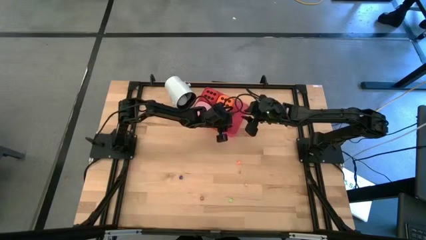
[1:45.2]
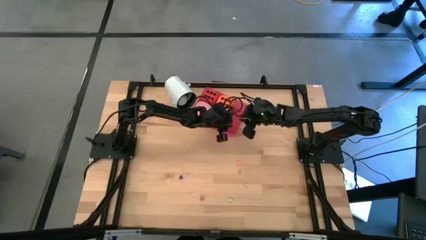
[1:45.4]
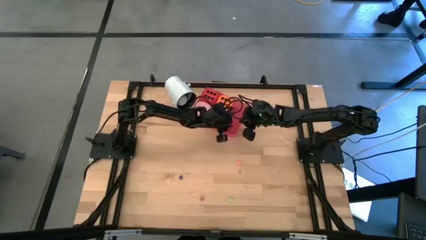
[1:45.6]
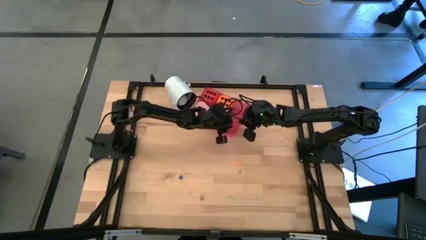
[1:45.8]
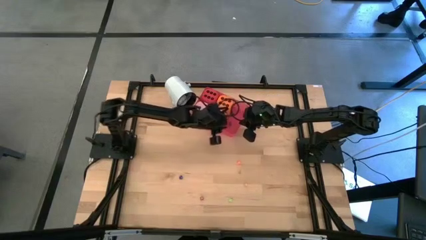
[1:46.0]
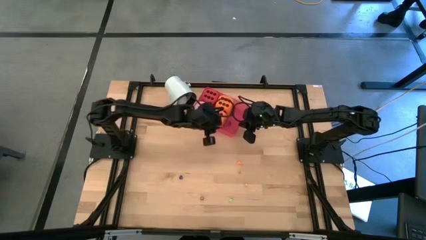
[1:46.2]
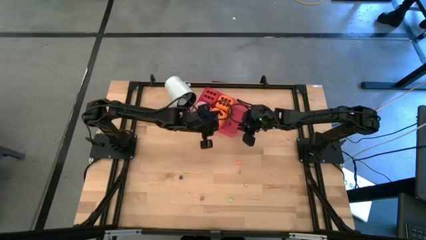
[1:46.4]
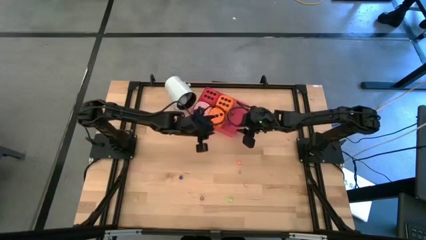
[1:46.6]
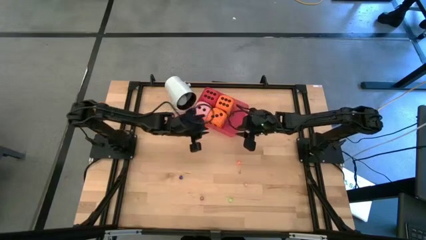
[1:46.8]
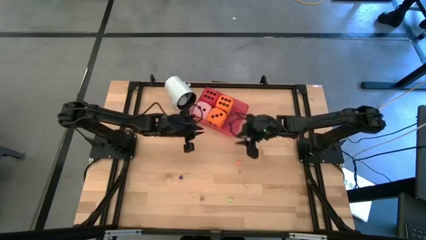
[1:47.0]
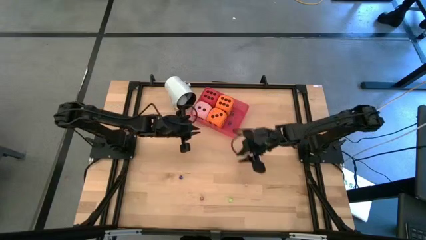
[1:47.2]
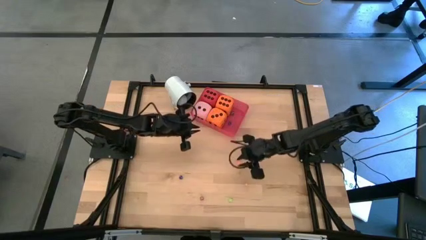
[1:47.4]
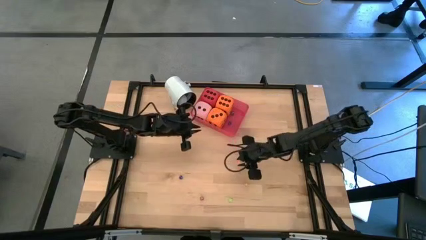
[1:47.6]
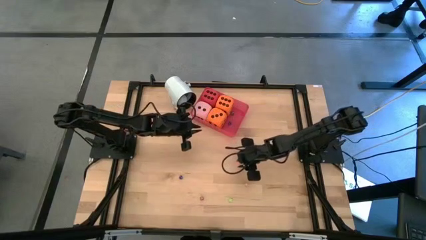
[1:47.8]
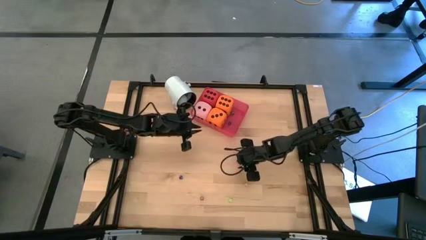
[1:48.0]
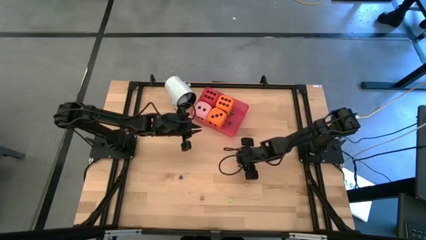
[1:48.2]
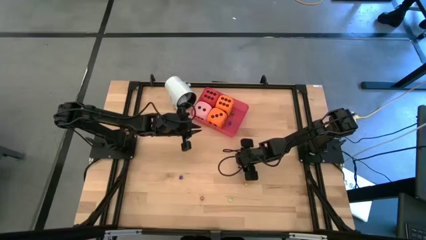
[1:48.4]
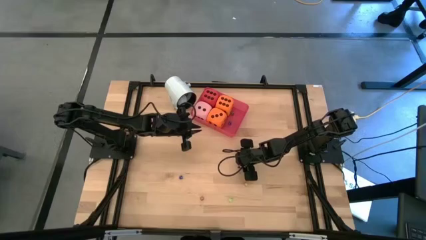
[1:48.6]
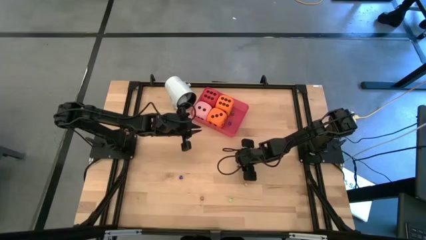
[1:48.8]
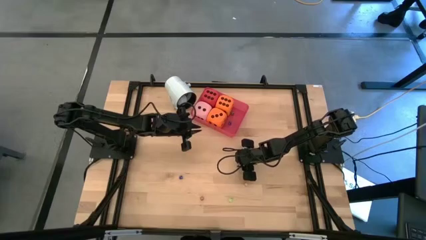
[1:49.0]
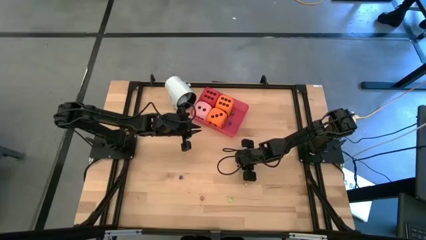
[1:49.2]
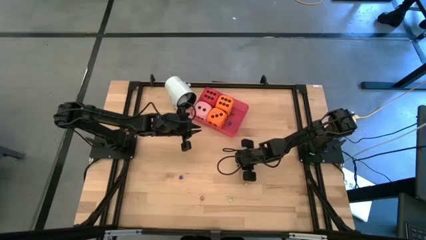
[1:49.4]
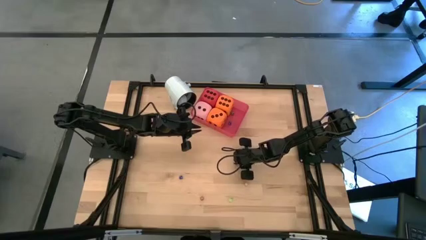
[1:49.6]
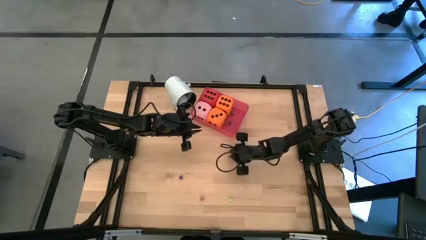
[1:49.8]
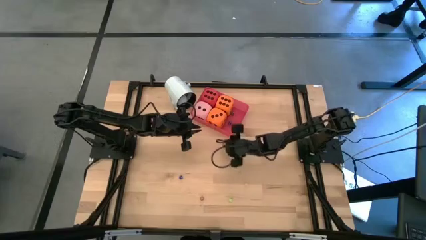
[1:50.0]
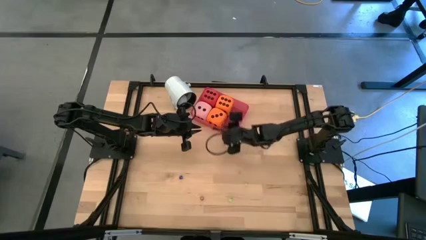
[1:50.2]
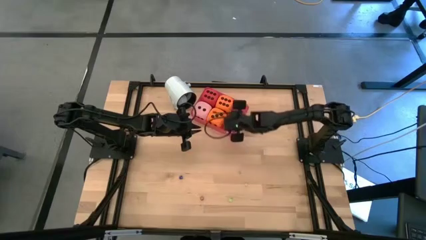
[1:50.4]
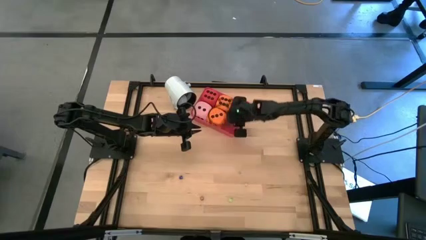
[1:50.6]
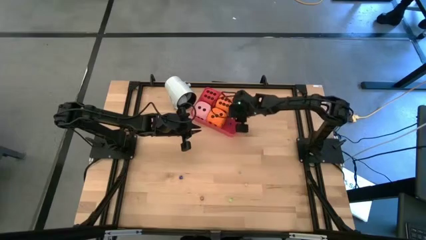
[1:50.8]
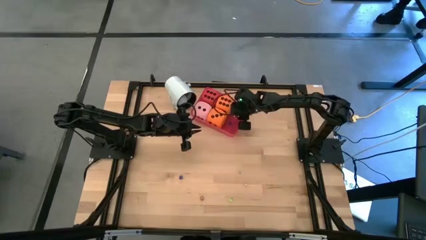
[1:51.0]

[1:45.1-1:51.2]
Task: Pick & Place Dice
Put the small orange die into the red bin

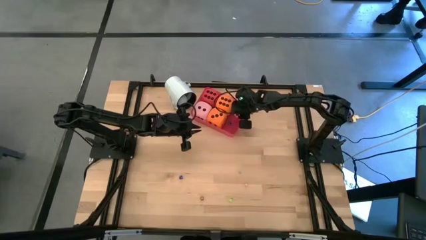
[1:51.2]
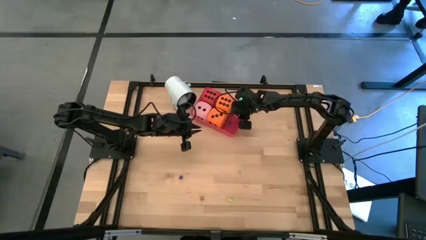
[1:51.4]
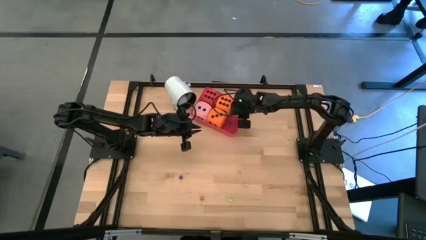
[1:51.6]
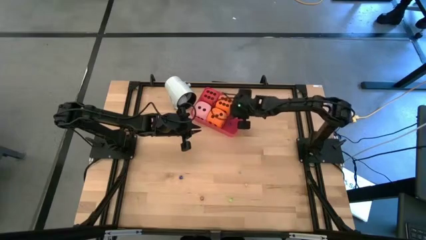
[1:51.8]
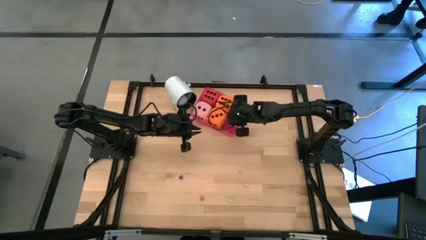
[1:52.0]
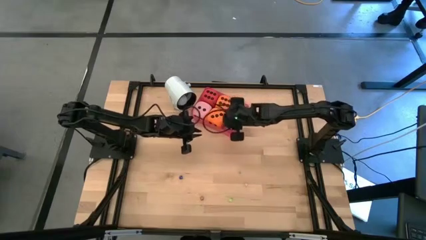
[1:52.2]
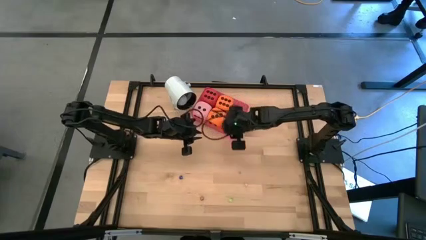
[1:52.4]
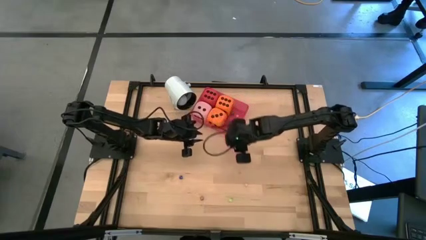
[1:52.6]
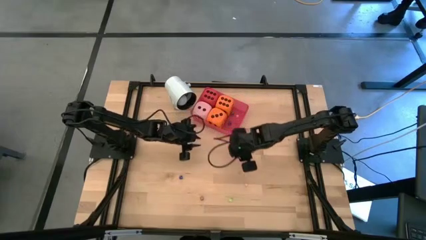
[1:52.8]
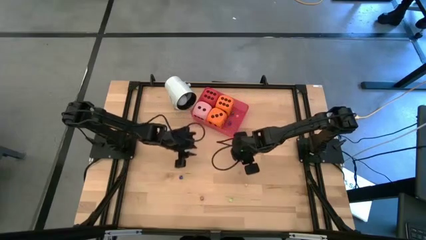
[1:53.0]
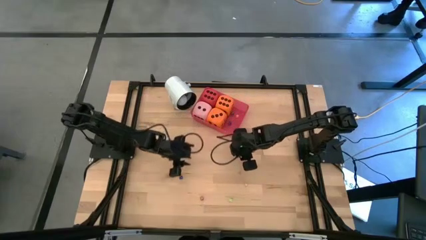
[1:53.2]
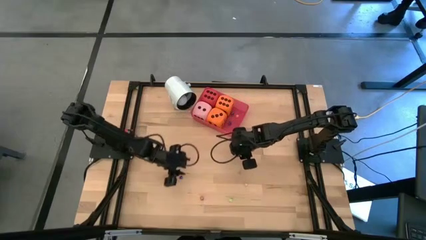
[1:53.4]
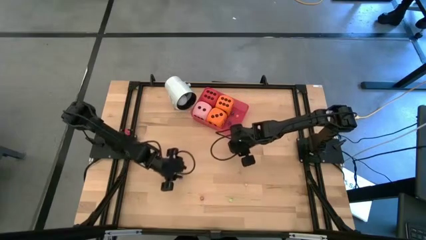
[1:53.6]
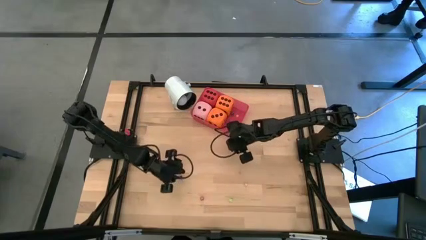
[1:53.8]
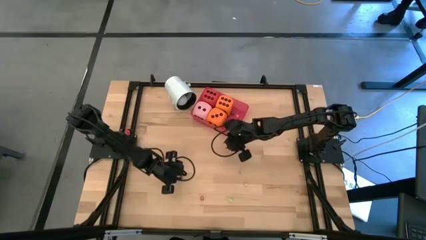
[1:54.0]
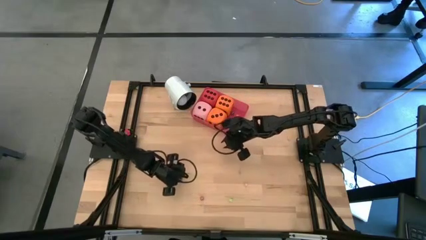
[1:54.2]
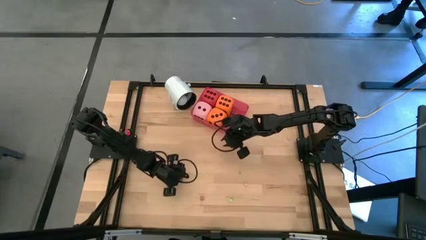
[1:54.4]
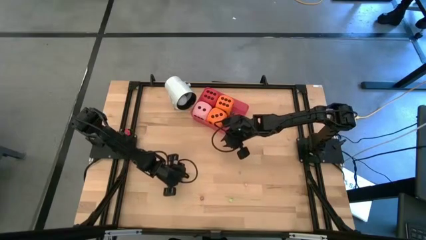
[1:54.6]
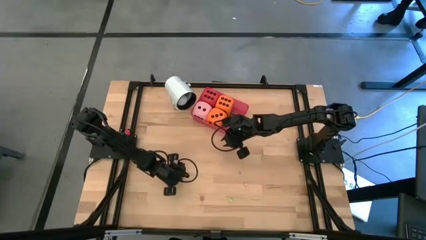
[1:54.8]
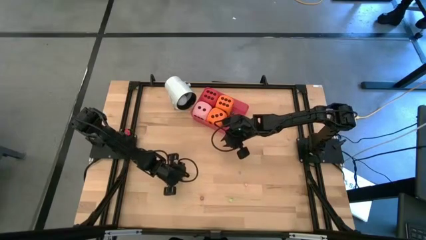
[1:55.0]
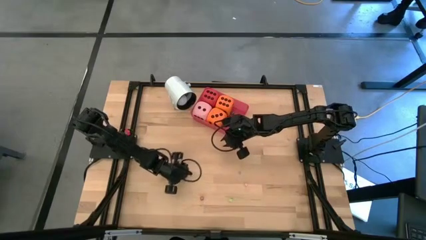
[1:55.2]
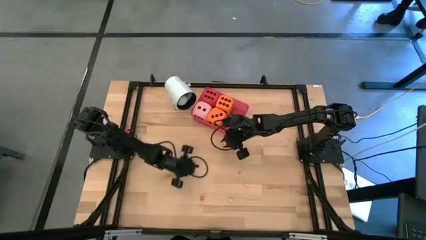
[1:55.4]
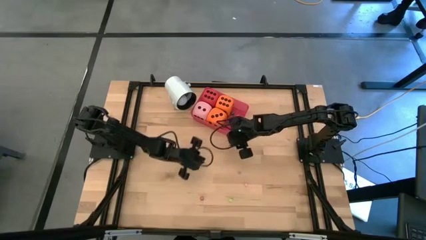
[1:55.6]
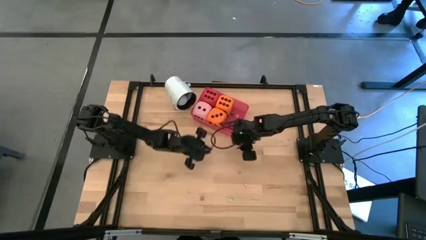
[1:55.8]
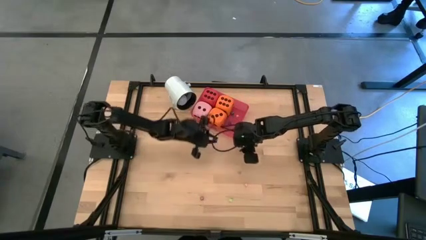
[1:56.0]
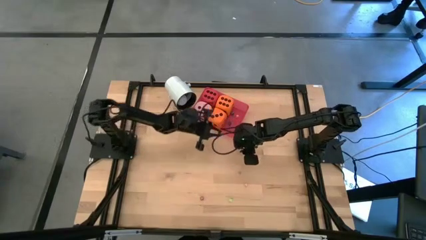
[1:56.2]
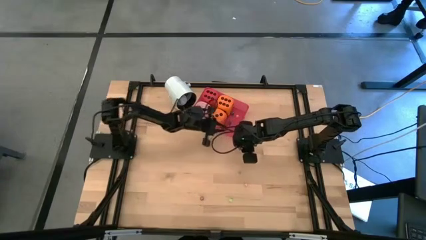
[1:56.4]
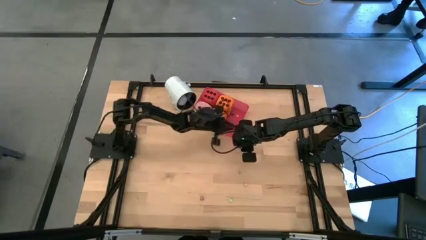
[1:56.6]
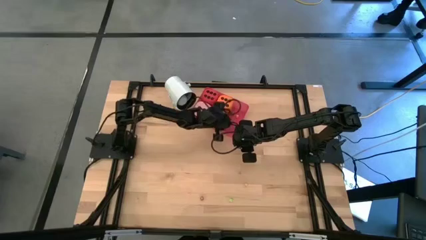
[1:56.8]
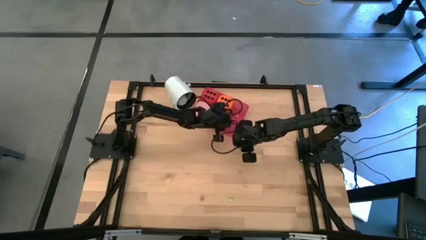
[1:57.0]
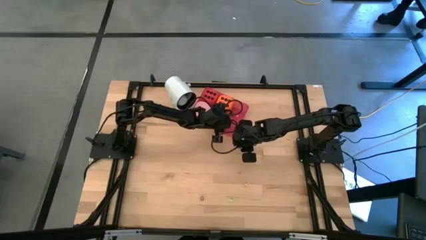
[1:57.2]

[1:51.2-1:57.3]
Put the small blue die into the red bin

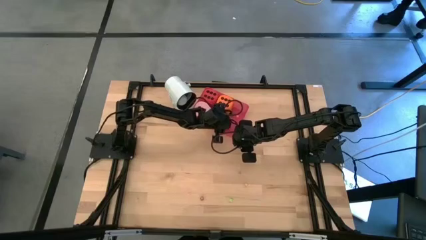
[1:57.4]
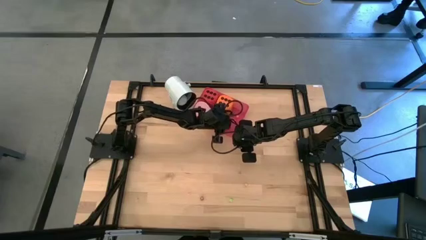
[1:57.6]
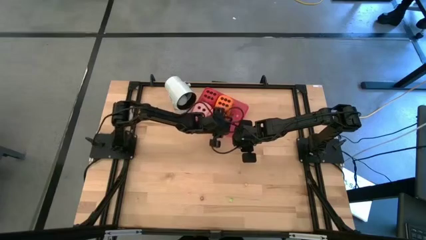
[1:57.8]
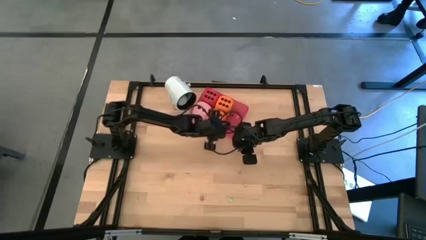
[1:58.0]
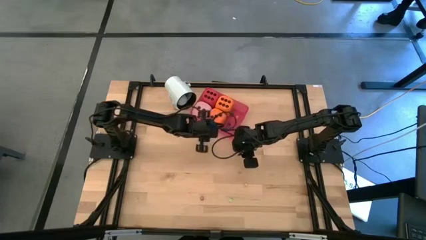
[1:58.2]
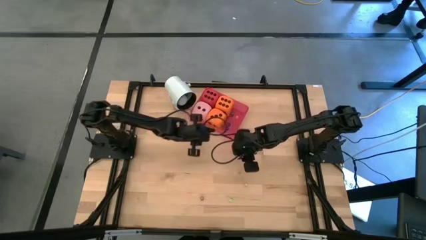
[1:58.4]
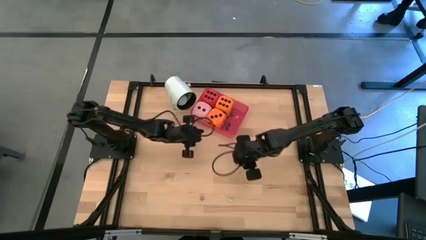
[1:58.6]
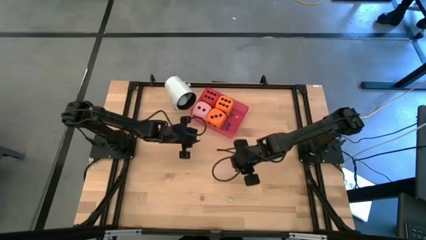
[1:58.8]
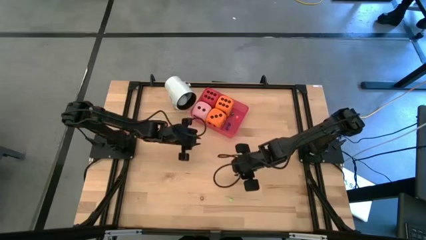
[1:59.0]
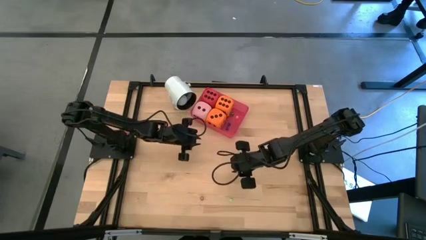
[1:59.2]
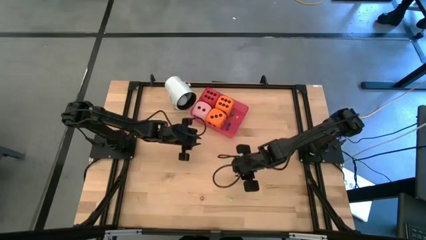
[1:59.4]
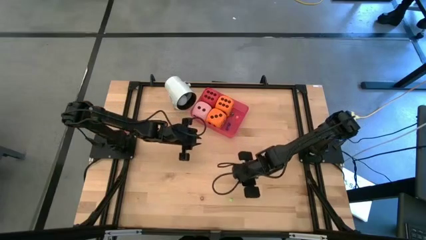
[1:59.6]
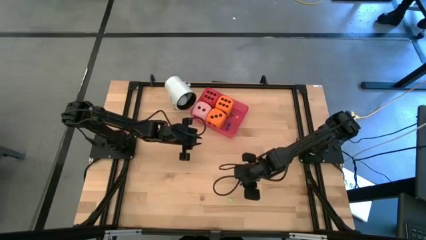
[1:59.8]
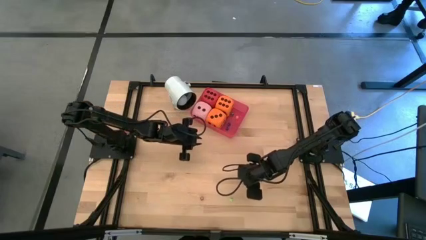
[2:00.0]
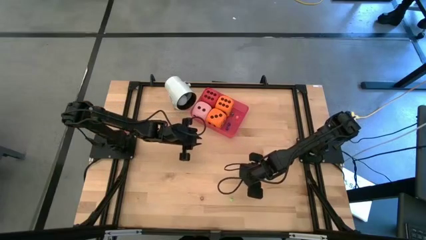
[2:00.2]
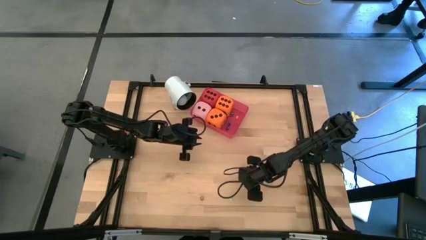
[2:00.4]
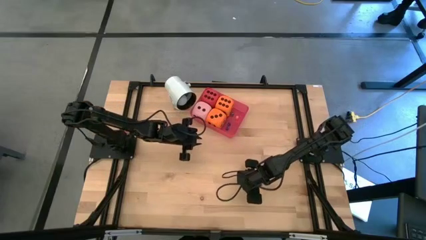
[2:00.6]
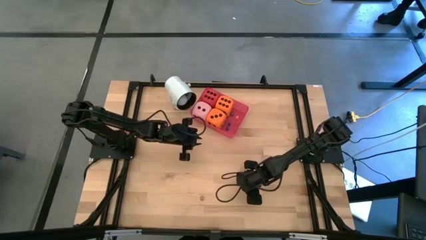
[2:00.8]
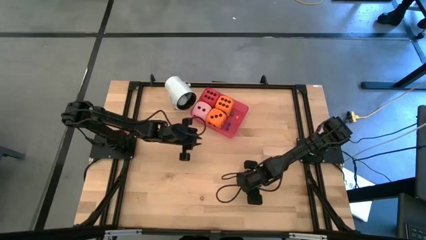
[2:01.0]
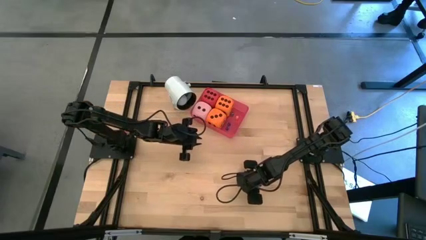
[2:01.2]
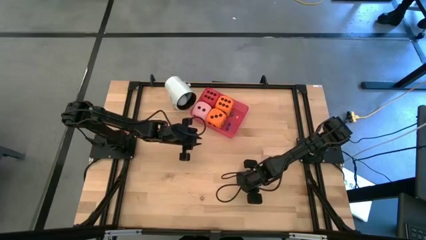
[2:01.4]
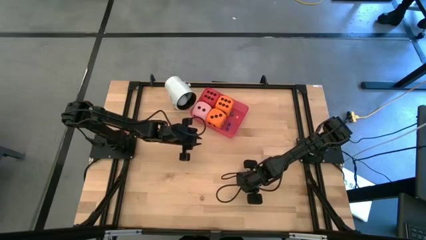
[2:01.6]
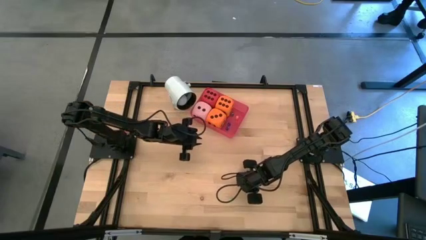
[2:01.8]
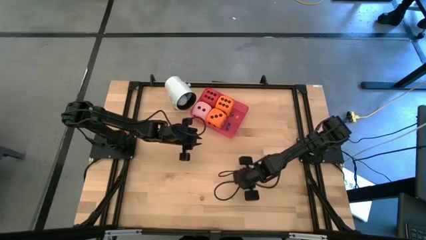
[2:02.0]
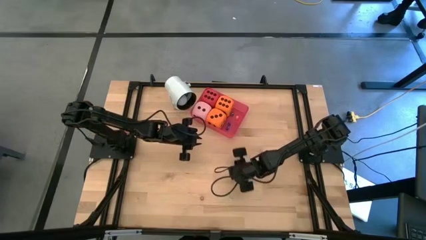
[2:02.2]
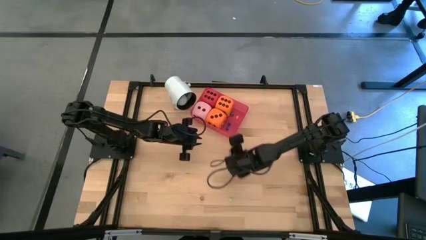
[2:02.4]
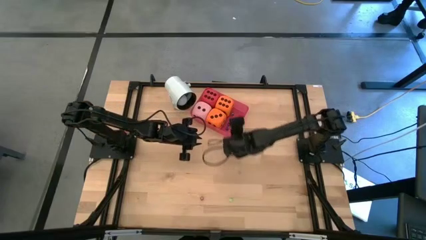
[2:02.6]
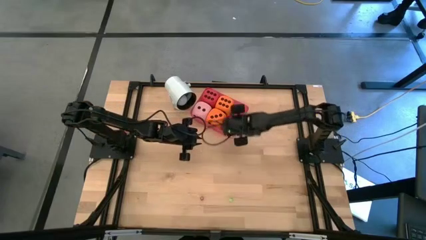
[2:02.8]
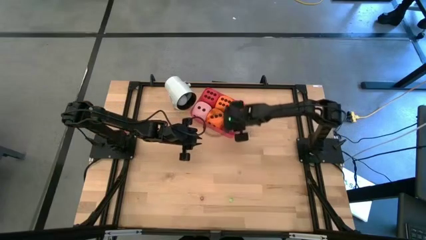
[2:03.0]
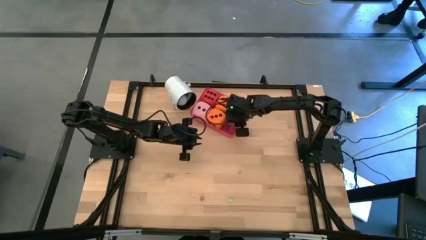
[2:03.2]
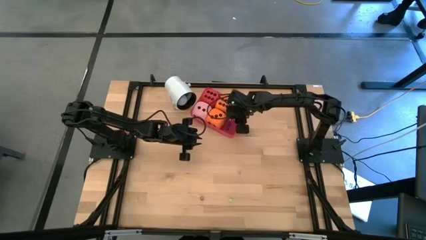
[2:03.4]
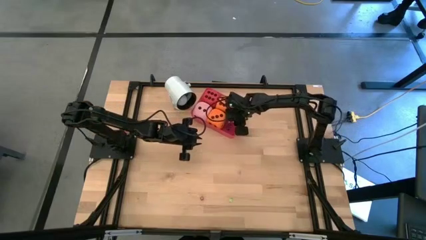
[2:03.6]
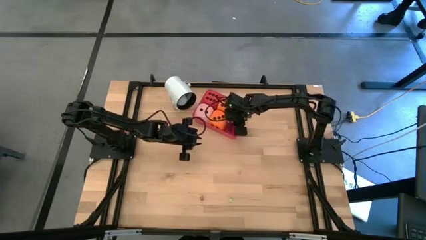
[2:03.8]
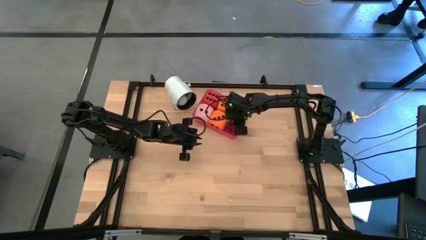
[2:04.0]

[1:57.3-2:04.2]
Put the small yellow die into the red bin
